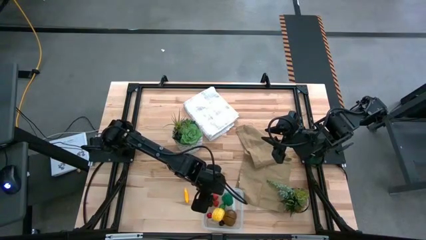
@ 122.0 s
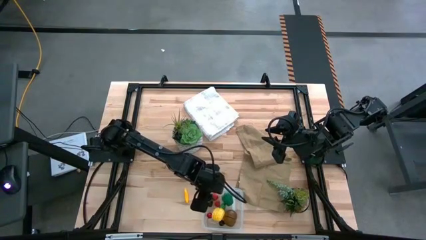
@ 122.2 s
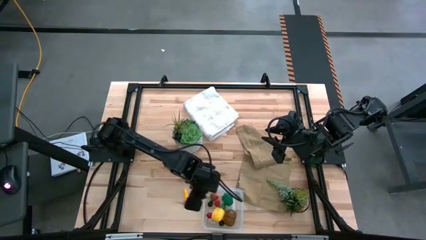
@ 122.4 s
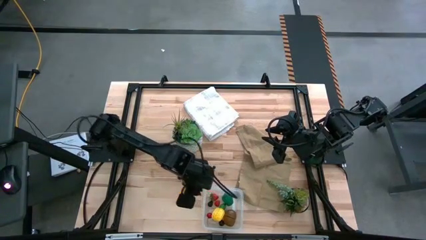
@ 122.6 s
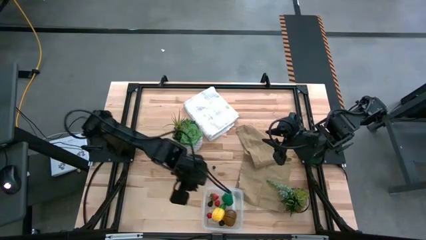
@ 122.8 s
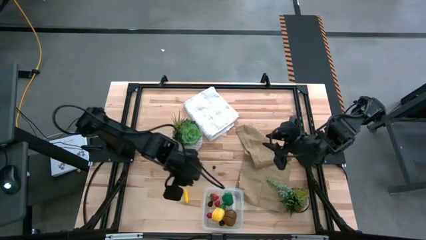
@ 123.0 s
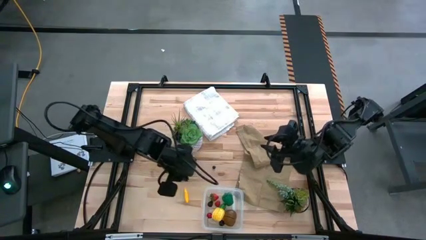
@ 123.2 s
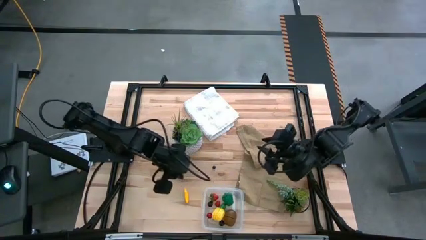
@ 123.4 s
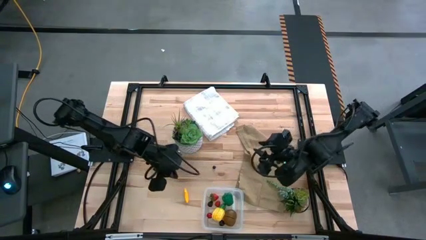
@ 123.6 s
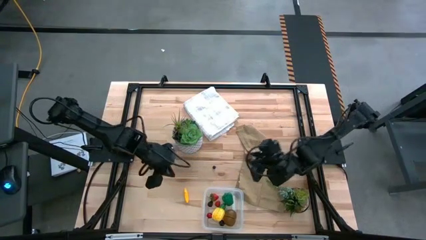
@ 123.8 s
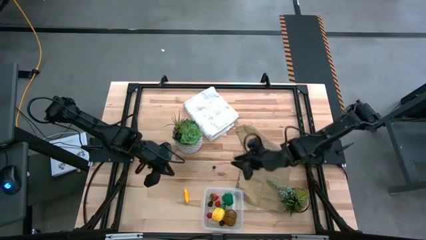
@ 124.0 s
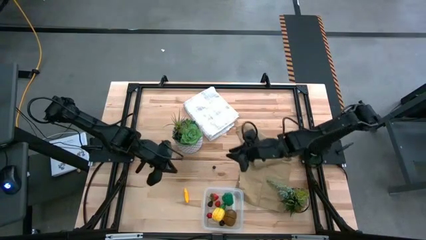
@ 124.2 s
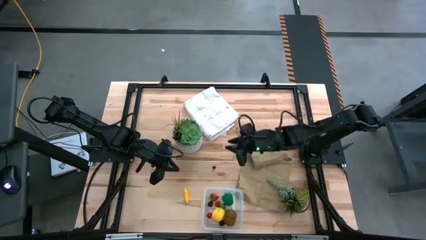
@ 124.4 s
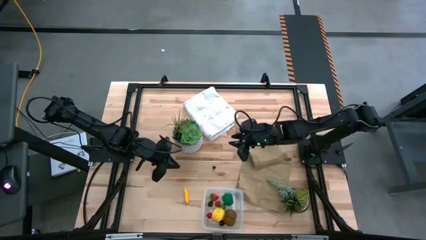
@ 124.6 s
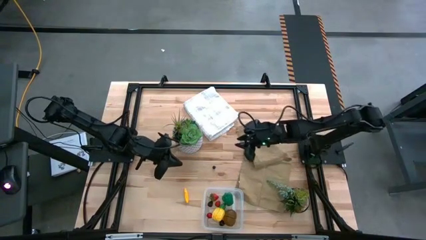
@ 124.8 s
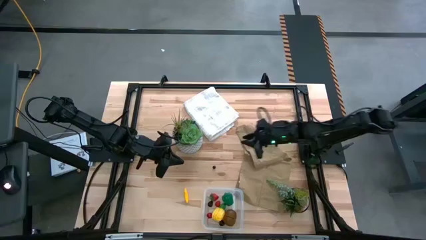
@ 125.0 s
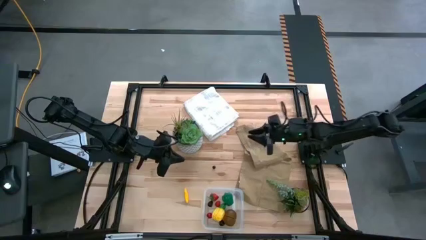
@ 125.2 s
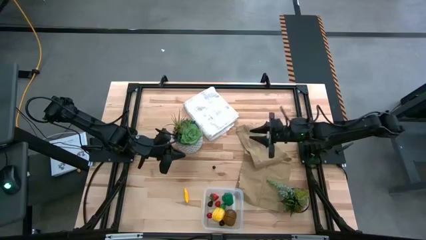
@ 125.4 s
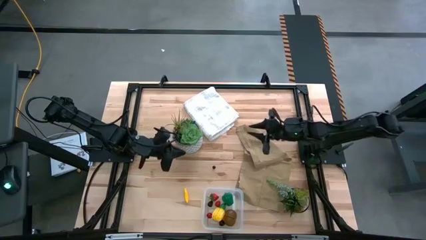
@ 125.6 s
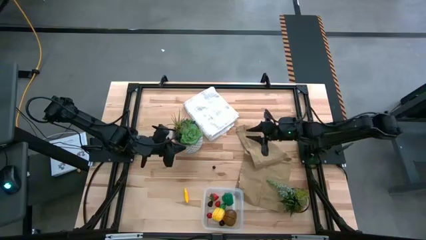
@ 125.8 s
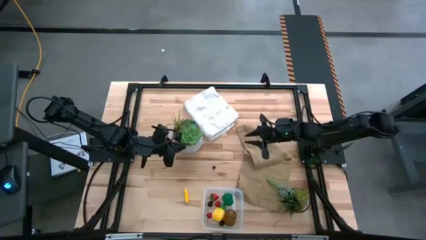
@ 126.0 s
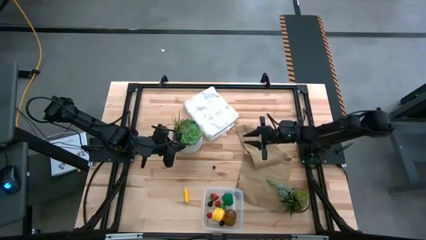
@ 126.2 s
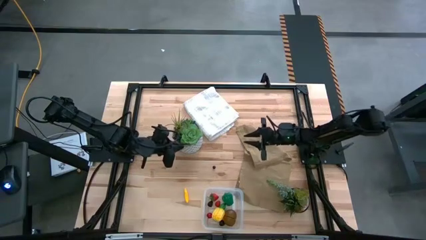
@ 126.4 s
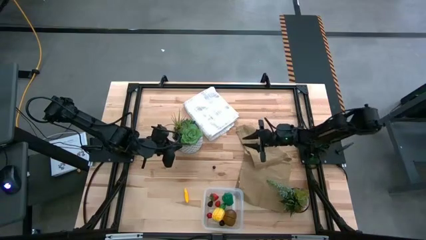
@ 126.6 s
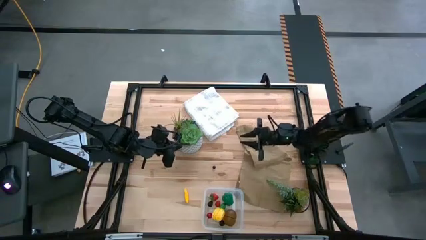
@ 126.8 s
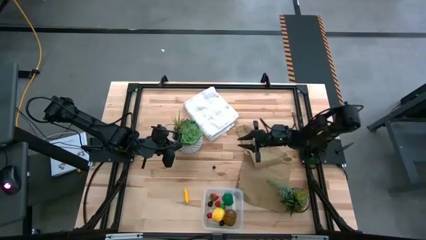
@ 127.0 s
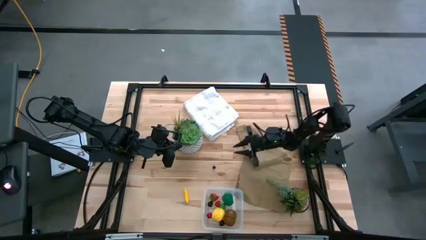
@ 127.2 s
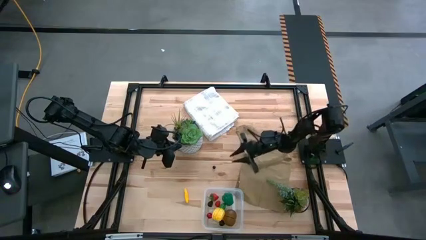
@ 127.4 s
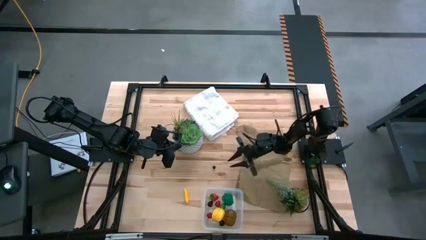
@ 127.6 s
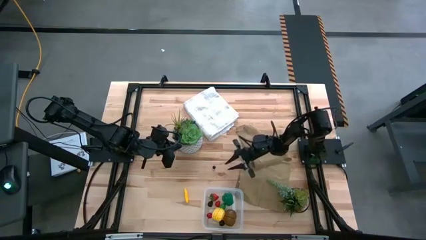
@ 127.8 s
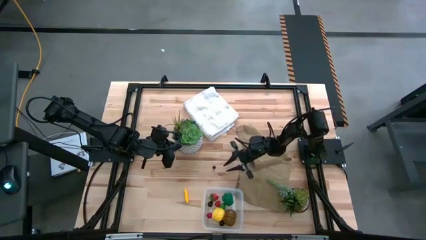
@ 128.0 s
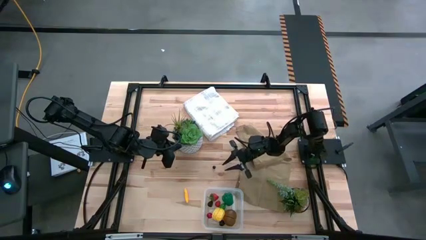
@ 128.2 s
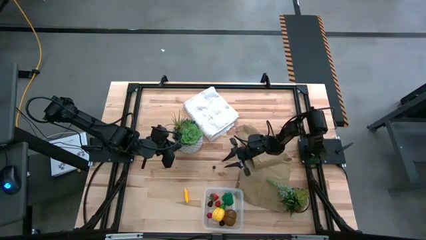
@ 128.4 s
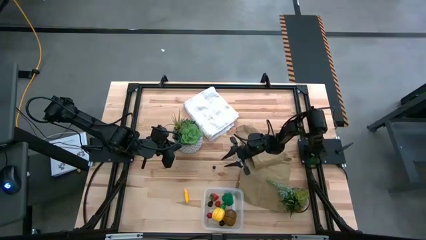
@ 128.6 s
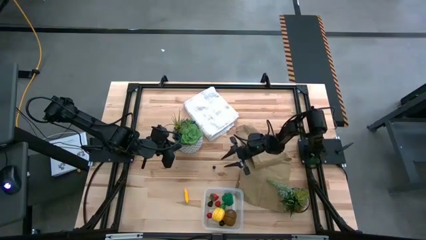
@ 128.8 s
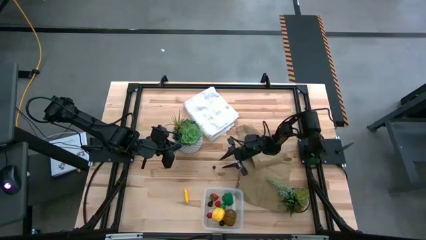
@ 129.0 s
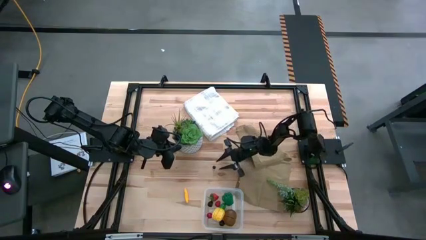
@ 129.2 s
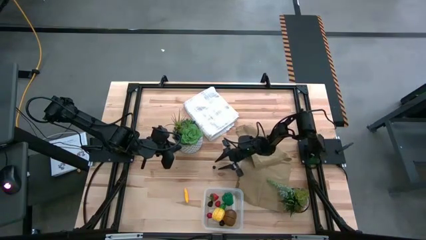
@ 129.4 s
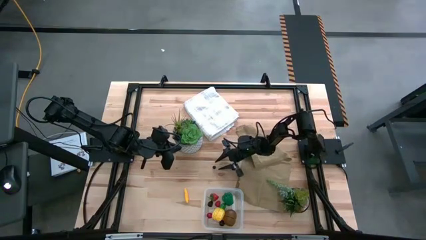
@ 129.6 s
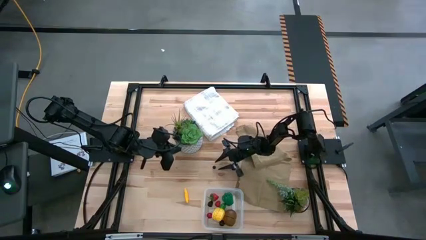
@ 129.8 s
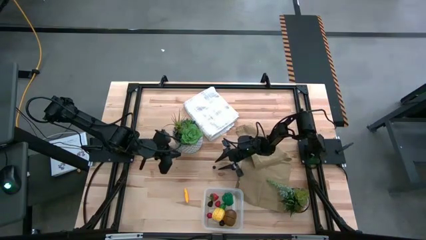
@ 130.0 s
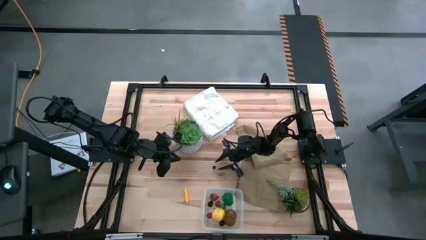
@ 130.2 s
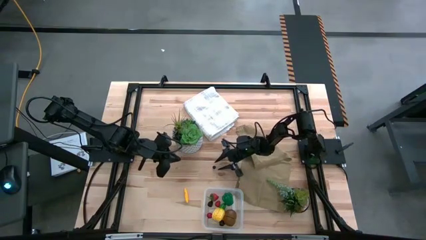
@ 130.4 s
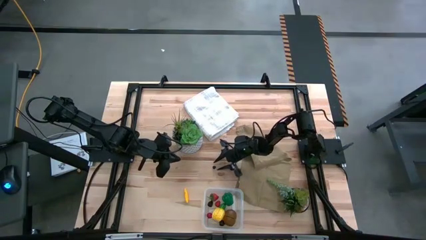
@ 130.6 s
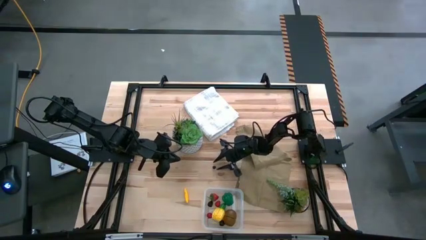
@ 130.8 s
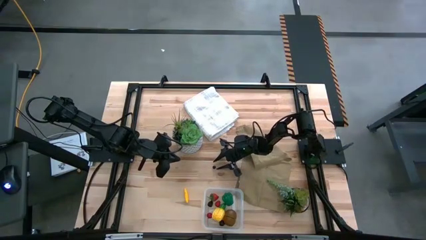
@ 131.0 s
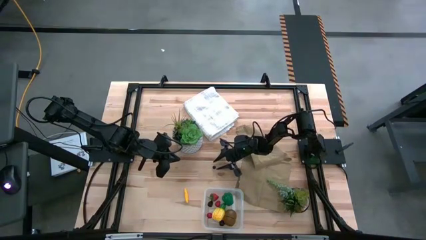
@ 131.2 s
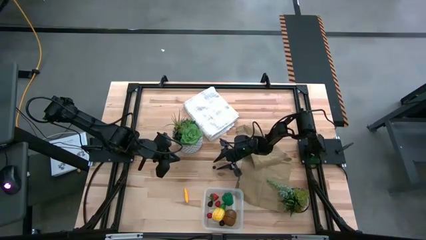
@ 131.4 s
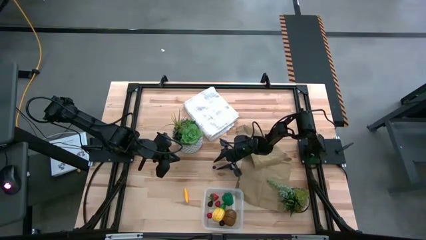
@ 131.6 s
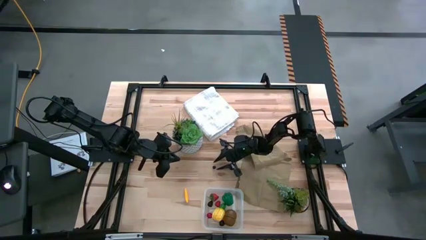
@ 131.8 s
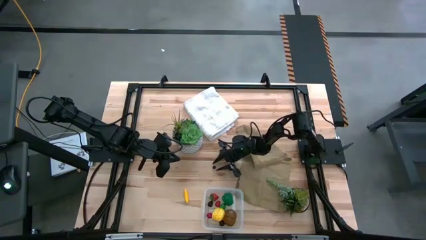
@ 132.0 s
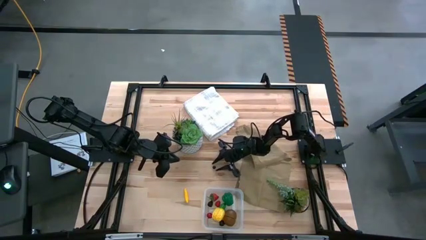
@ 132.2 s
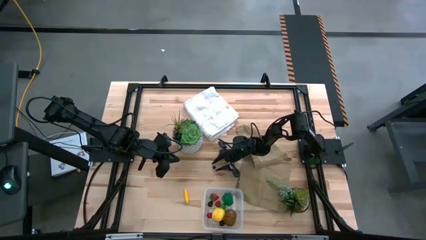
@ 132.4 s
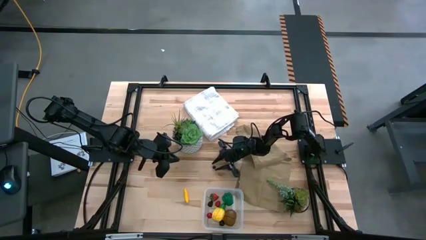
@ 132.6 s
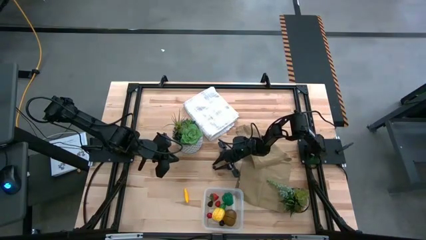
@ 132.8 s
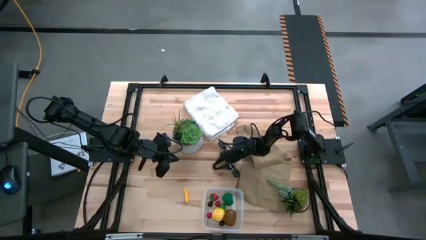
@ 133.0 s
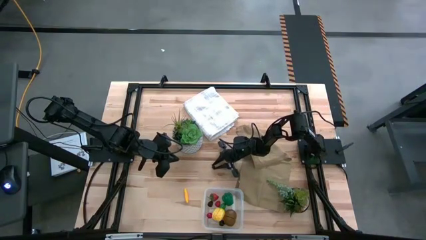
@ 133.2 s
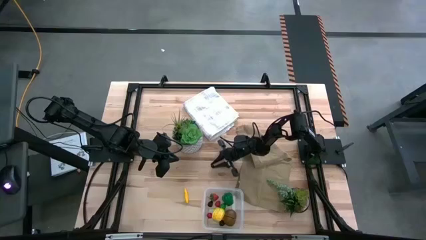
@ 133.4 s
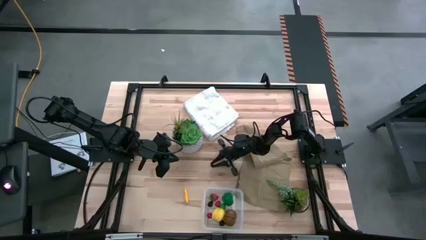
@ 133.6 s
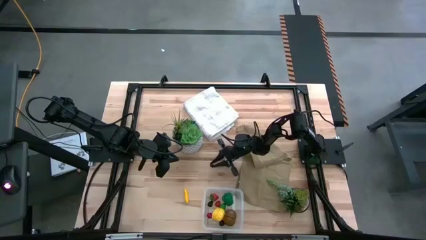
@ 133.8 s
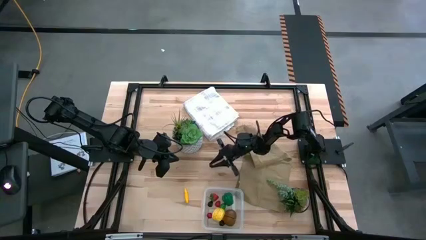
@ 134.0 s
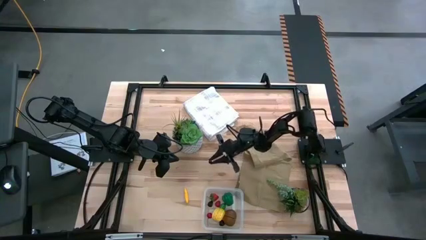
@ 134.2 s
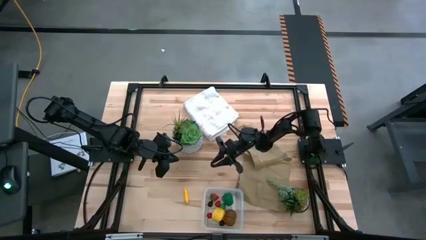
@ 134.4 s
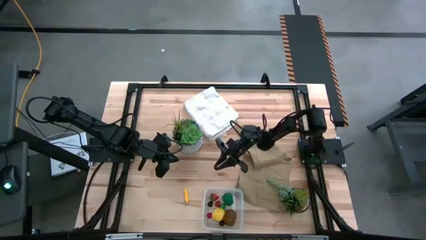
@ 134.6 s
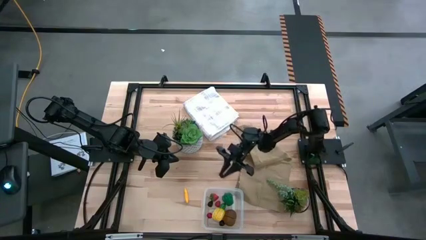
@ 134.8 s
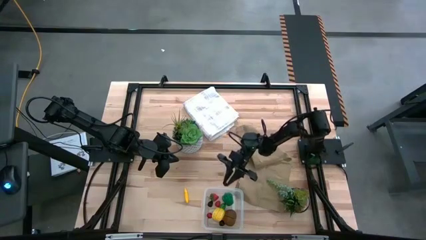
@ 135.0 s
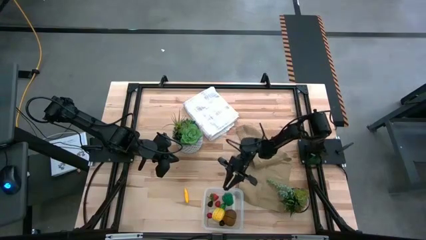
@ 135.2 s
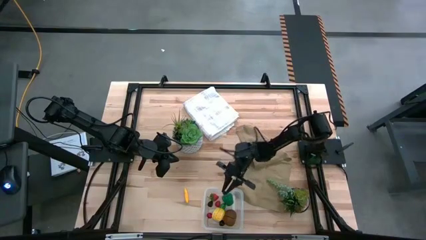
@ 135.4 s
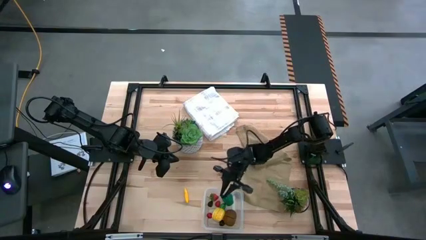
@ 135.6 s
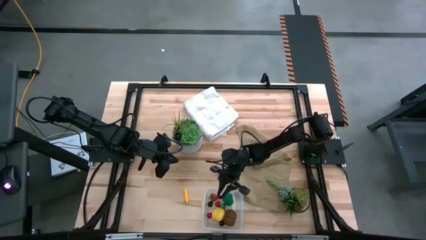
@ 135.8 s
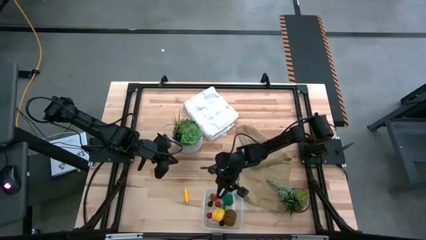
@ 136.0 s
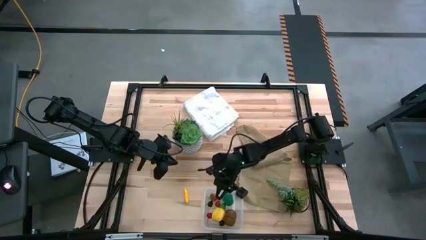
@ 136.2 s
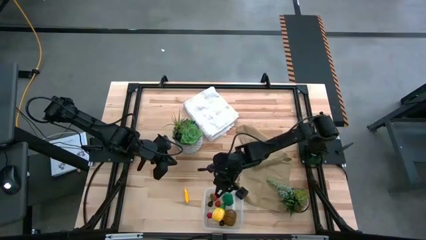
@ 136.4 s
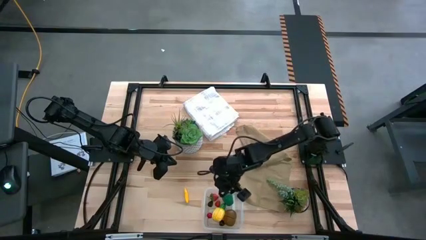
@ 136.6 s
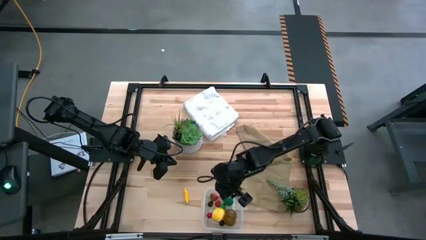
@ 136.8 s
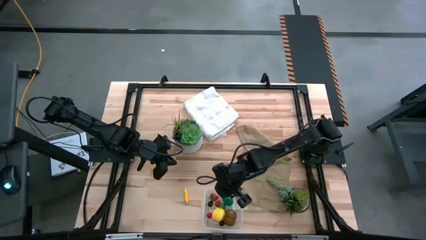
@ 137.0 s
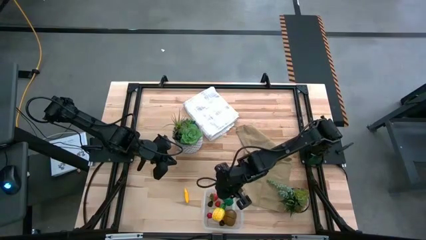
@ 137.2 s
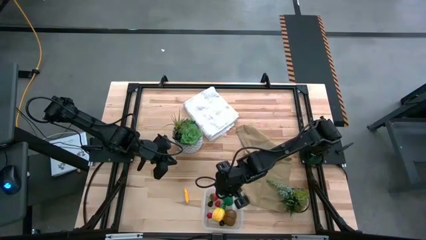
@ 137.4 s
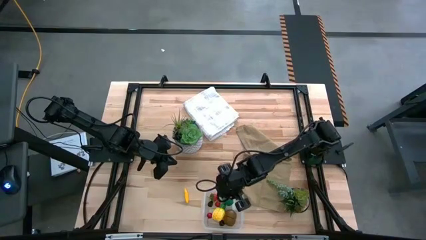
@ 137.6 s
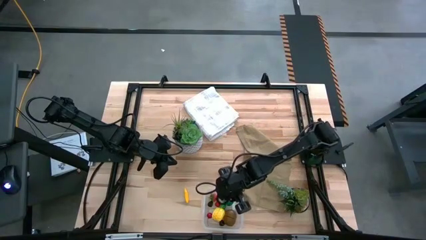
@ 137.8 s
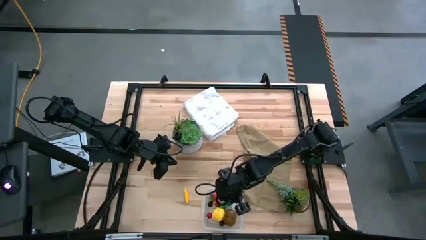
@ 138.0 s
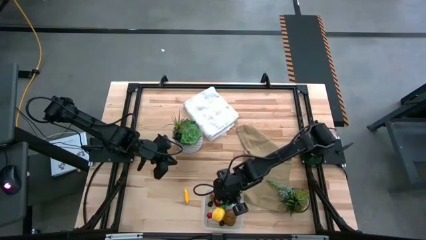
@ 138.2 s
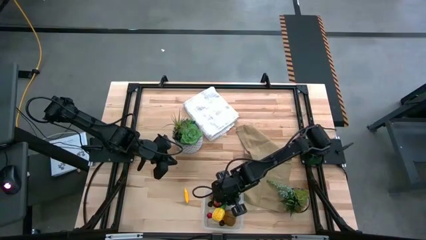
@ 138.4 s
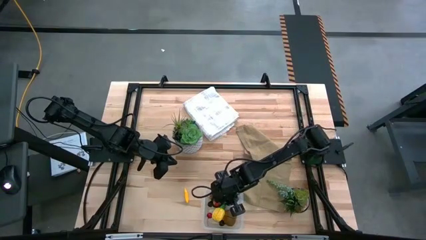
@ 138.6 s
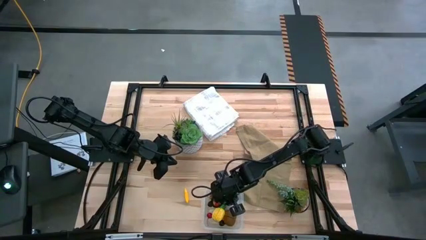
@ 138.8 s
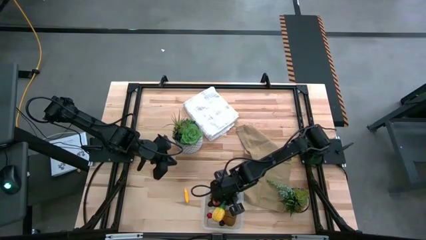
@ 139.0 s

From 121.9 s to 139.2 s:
Task: Pick and placing Produce into tupperware
Put the dark purple blueberry into the transparent bin
